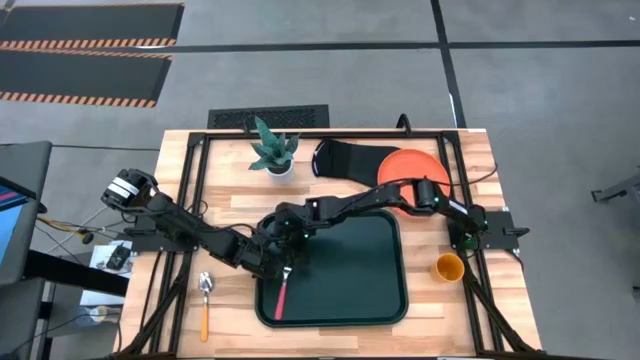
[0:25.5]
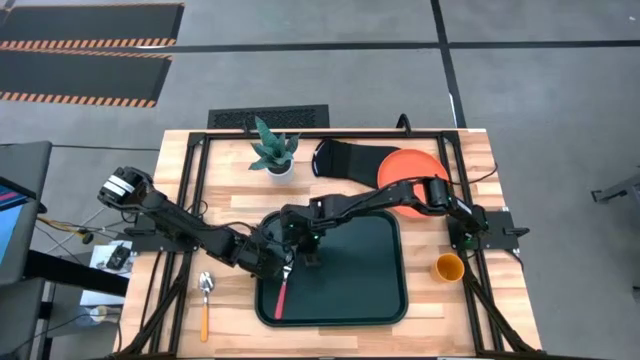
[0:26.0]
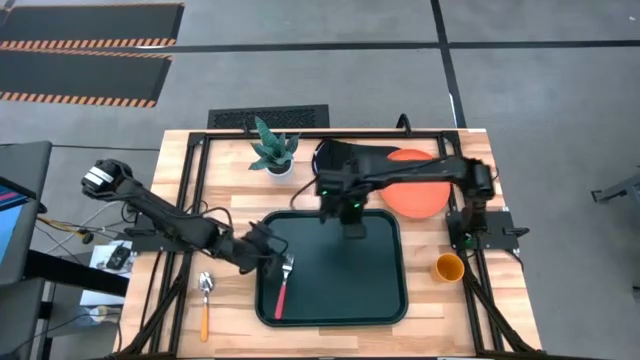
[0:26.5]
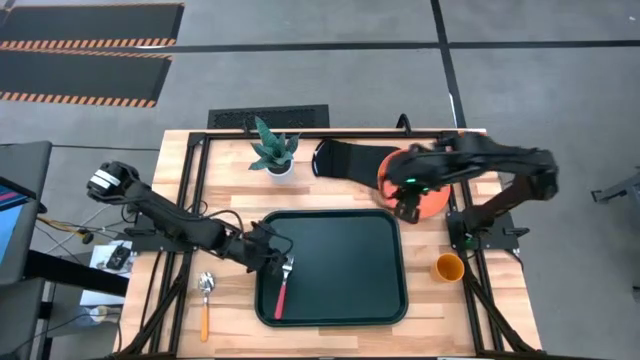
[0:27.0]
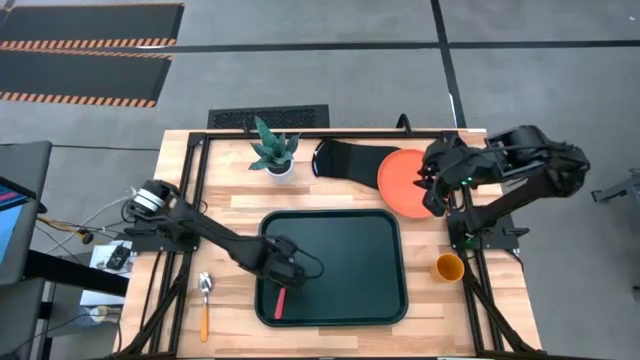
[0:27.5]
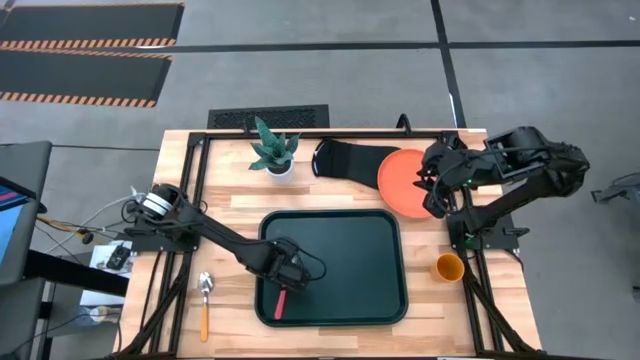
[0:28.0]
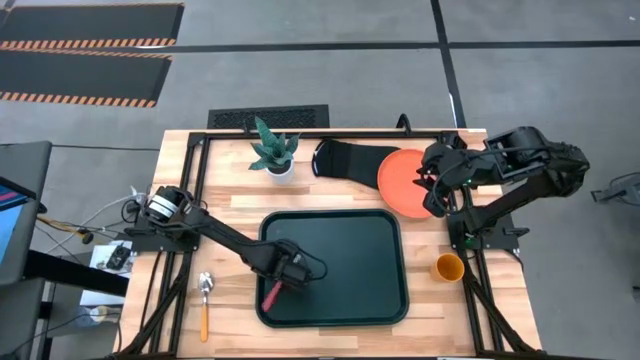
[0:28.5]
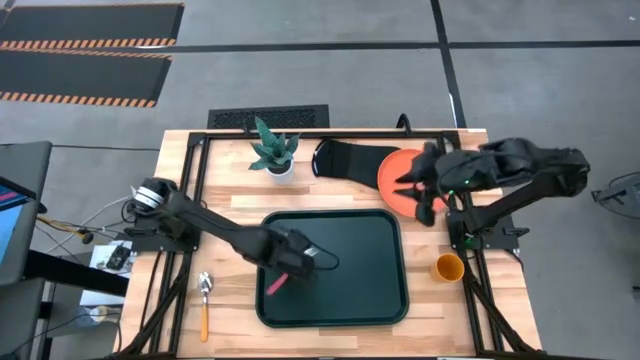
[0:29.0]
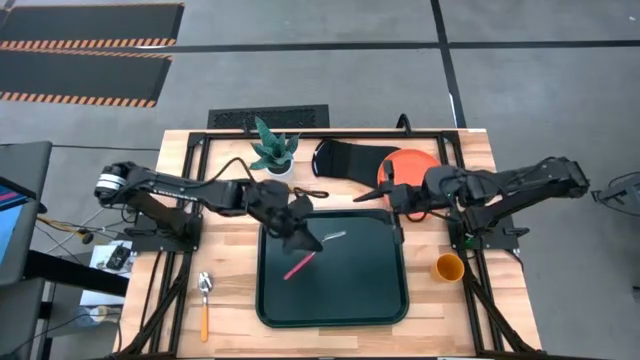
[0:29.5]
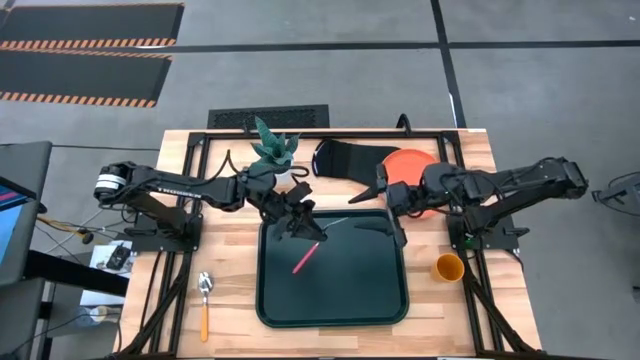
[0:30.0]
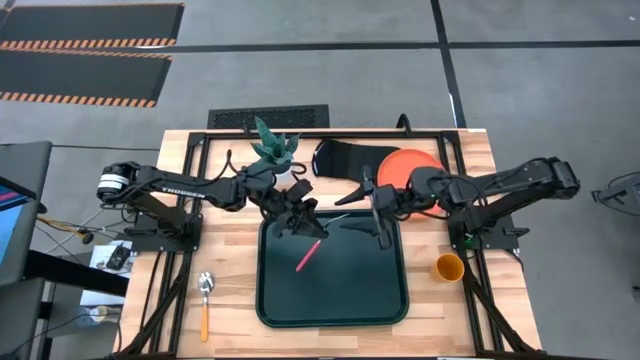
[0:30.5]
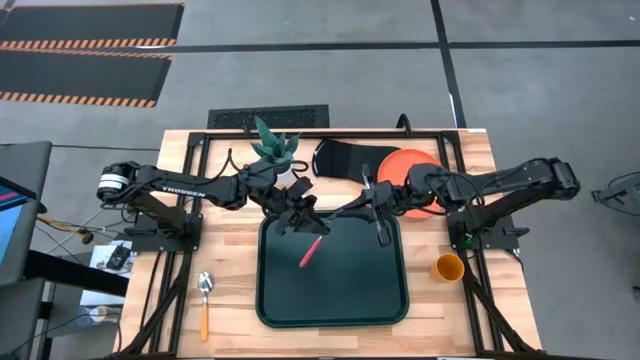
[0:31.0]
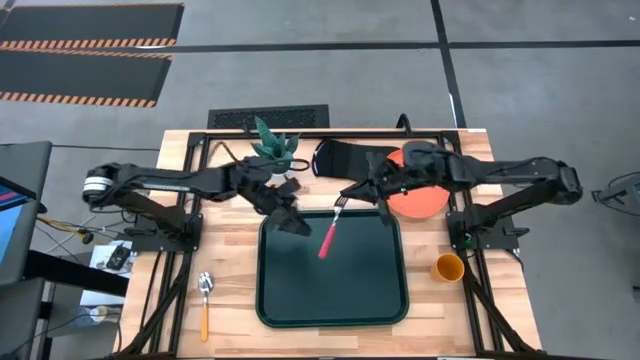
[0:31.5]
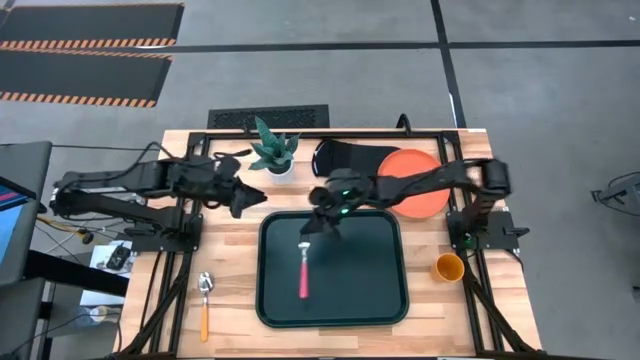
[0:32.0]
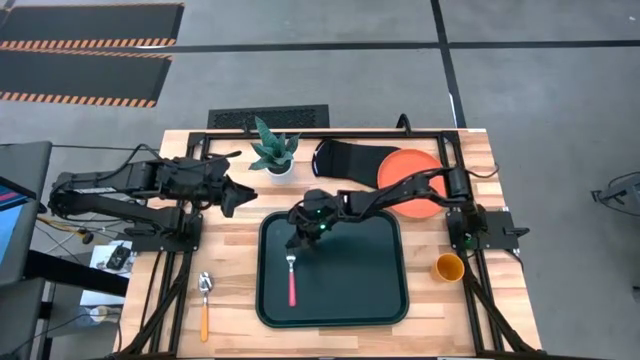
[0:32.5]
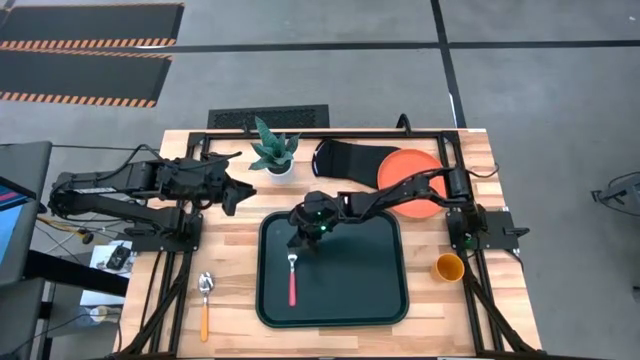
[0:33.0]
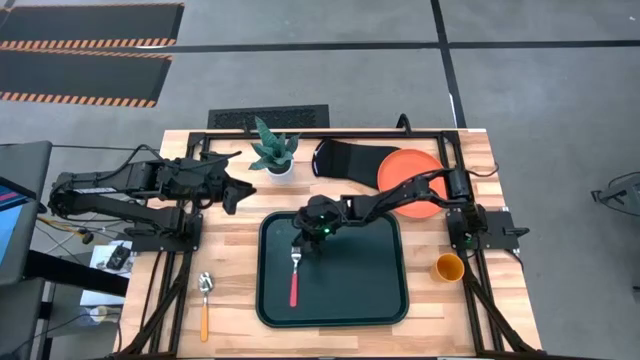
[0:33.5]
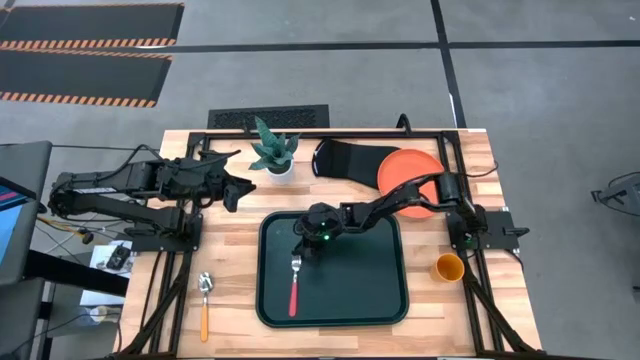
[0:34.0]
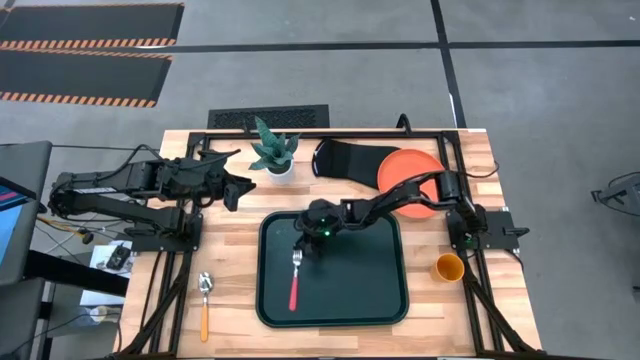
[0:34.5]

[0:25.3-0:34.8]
Task: Pick and place plate/cup/fork/spoon on tray
Put the pink fork on the left side of the black tray

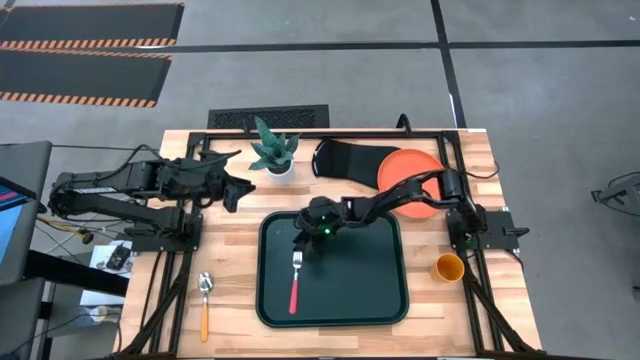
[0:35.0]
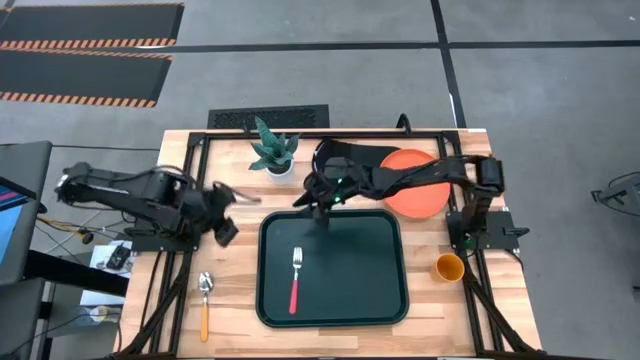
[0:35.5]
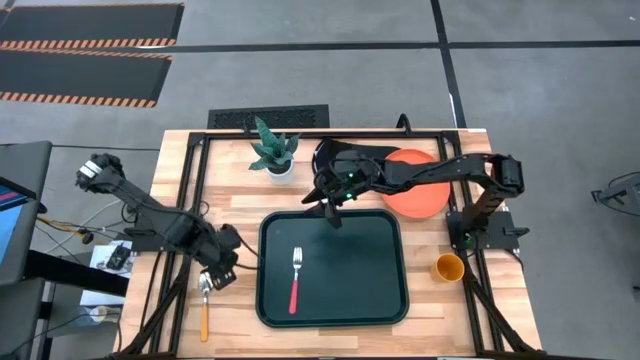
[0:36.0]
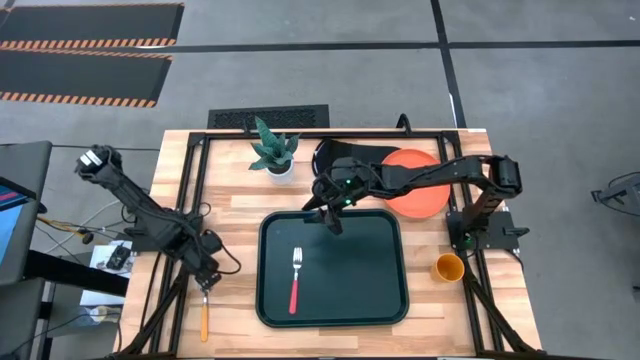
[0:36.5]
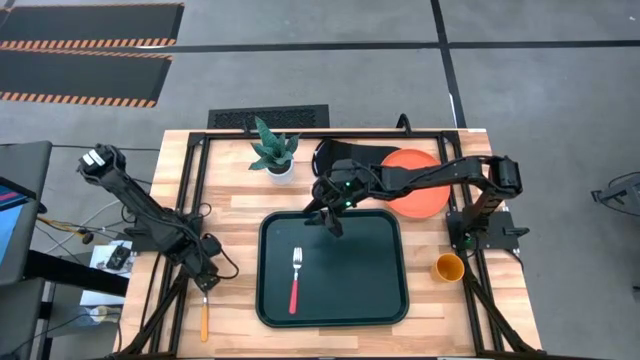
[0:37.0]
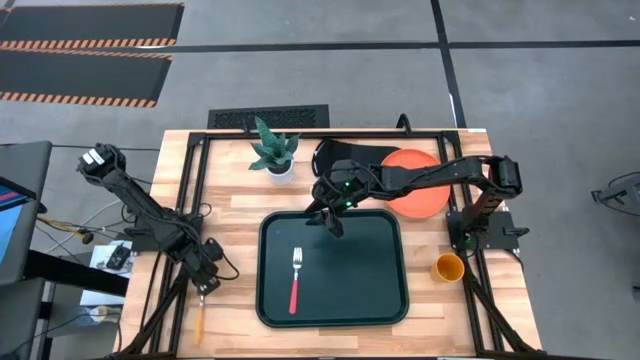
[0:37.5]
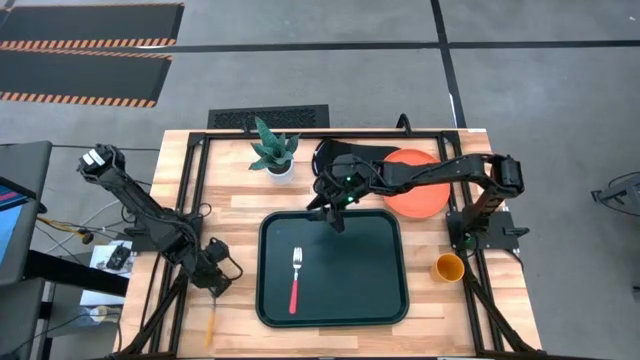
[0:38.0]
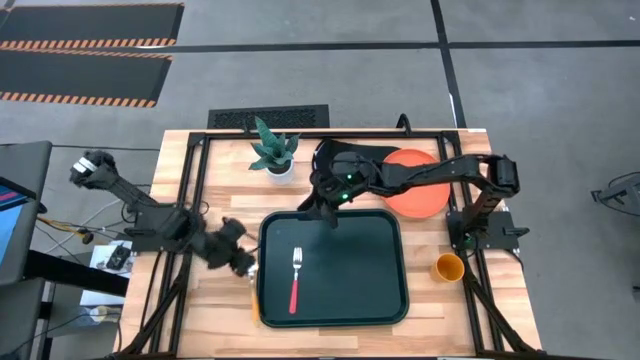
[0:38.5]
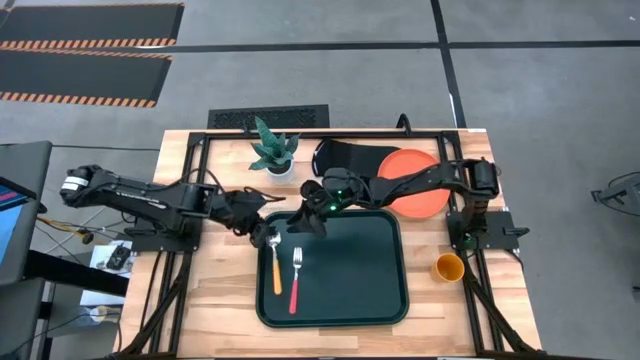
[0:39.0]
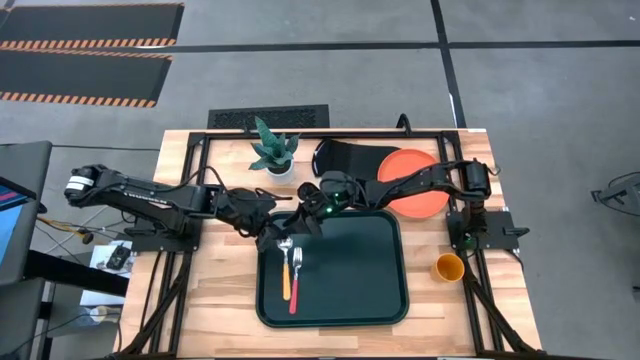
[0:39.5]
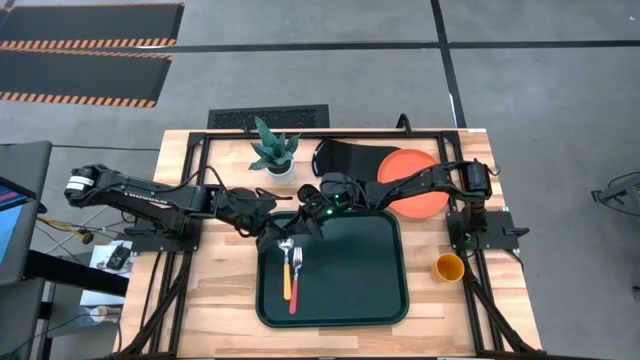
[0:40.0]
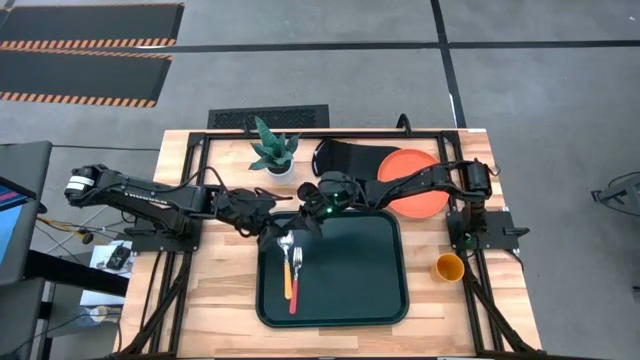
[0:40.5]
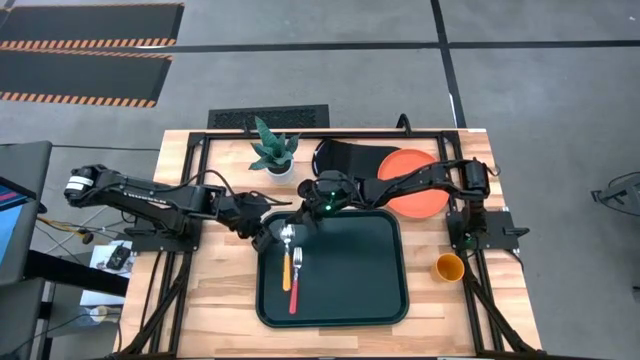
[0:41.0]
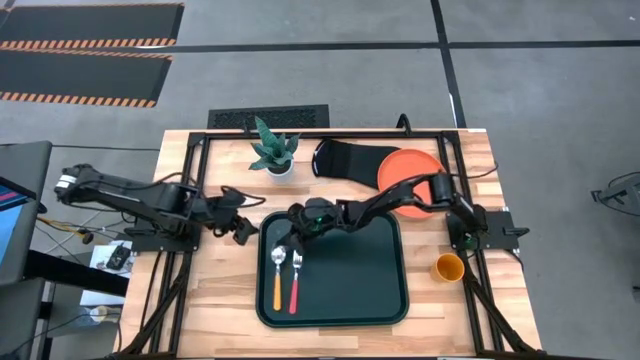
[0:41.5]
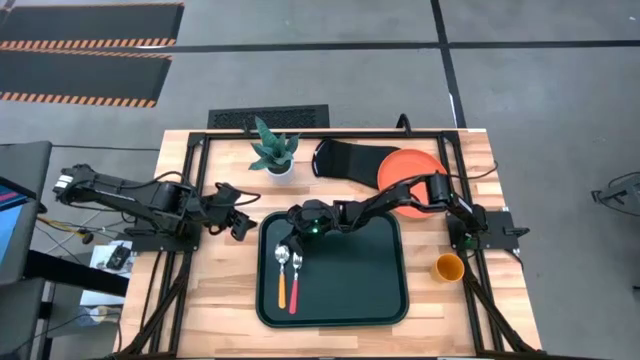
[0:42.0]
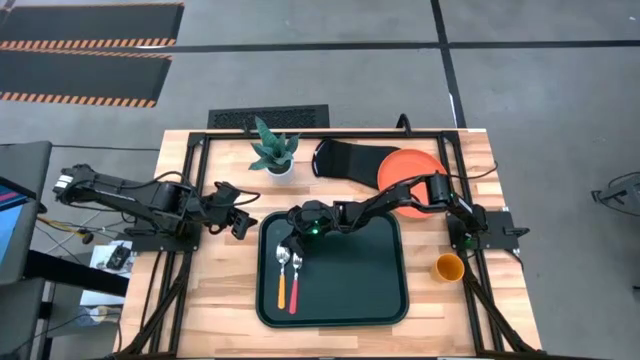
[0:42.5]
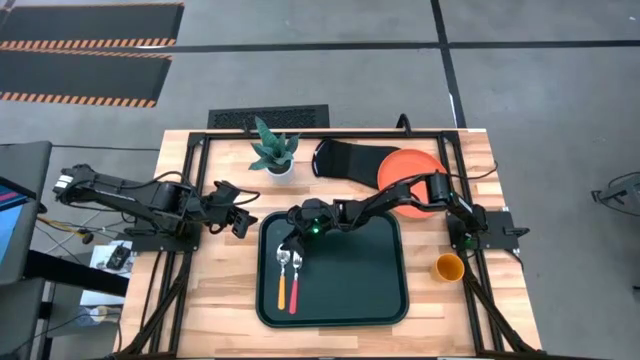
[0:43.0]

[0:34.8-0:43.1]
Put the yellow spoon on the black tray to the left side of the pink fork
